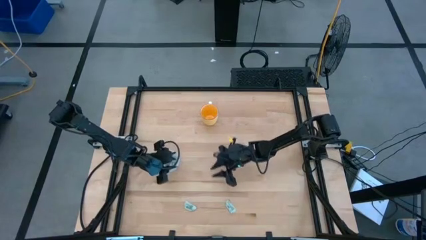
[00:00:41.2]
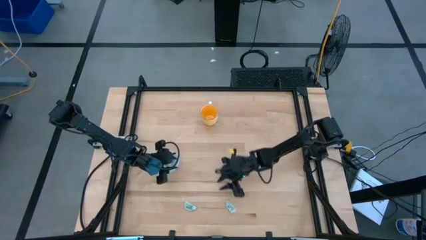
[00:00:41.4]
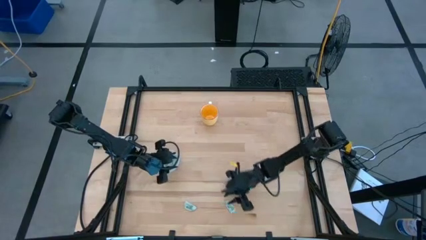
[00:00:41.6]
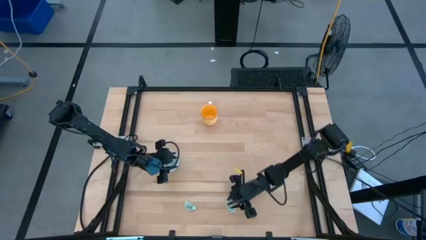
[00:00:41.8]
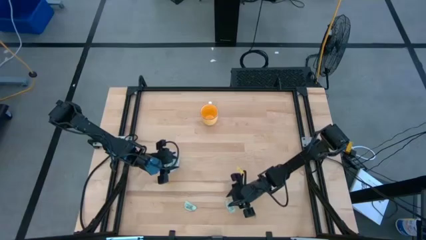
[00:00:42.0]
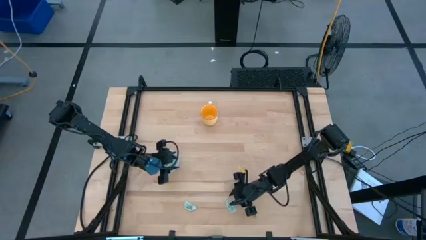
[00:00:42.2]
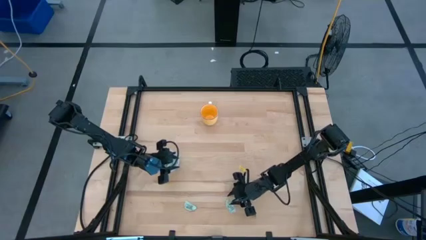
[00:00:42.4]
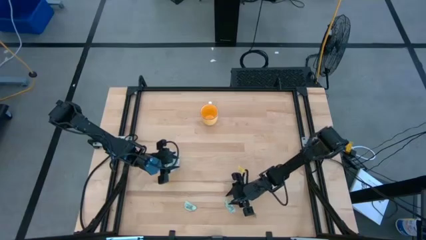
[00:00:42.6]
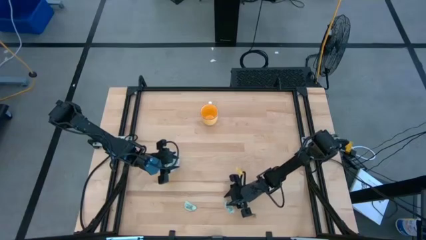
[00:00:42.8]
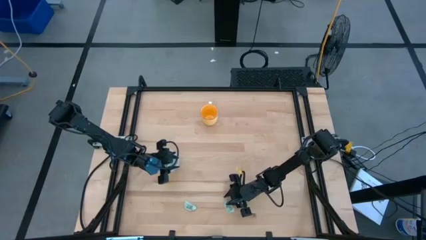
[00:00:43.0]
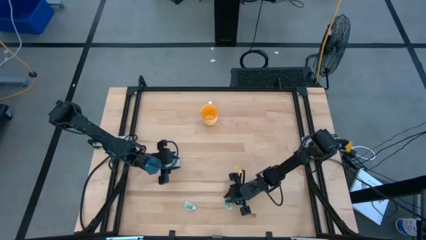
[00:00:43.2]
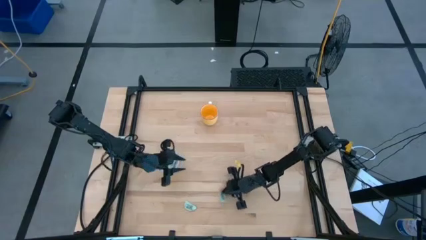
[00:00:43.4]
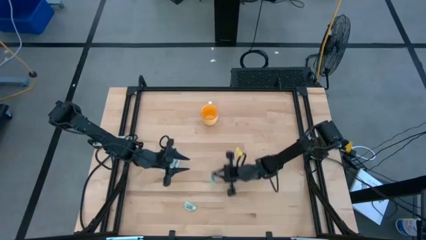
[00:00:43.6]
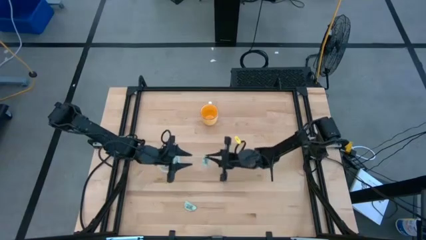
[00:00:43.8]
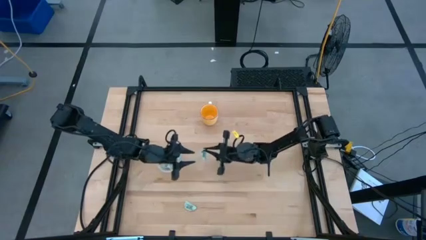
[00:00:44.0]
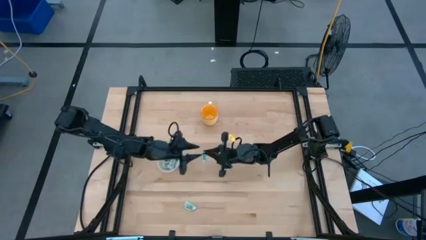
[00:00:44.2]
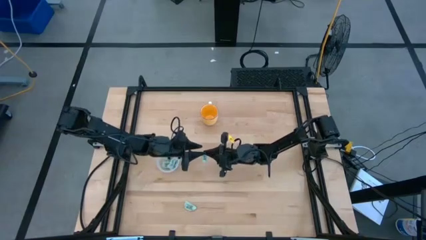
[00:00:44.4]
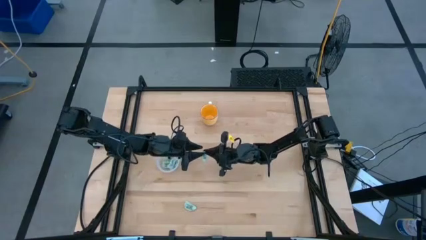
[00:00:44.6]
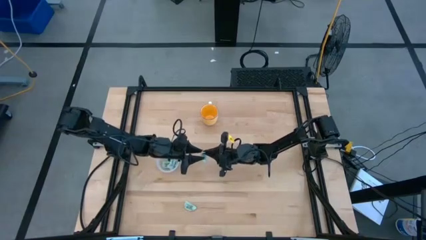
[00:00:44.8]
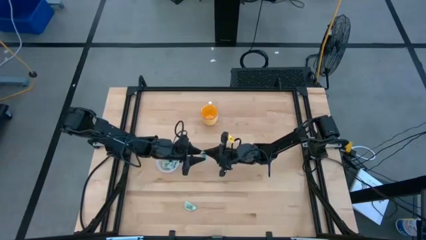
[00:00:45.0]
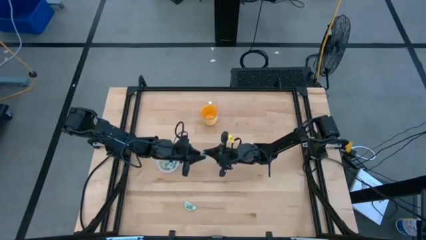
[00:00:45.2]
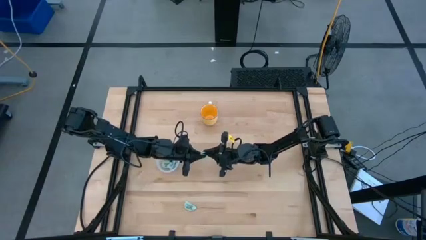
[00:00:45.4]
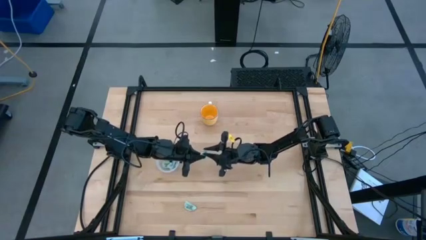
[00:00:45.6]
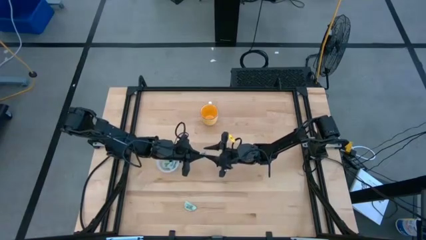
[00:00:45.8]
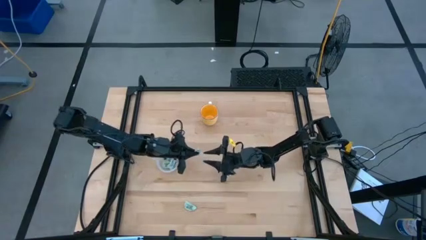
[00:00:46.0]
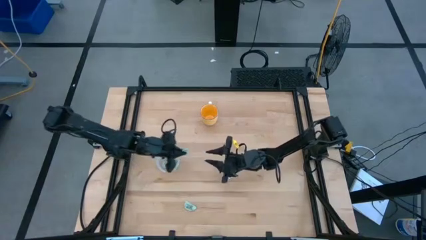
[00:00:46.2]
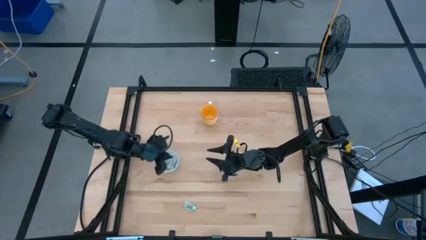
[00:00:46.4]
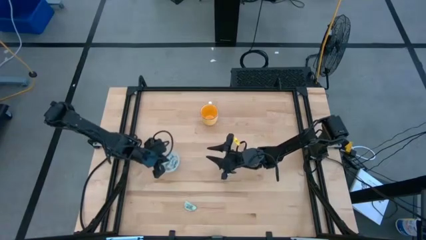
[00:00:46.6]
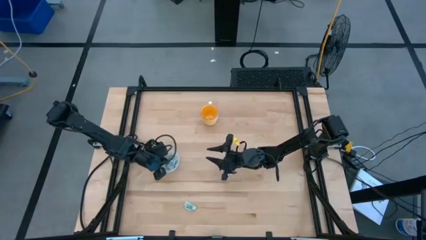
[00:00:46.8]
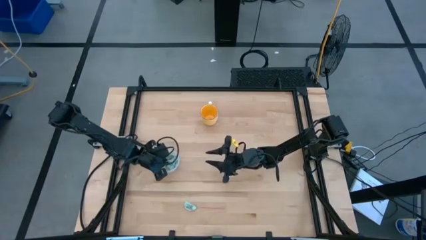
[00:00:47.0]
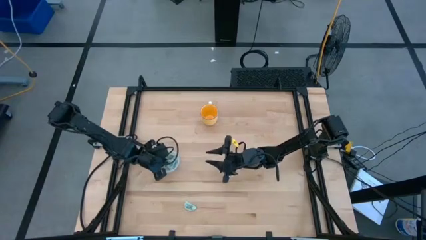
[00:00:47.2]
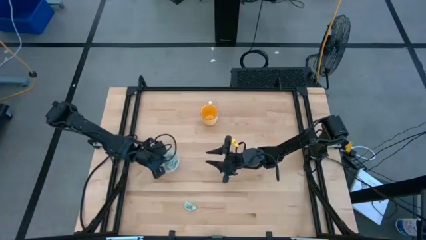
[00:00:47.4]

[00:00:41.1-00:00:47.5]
Task: Pick and place Stevia / Truvia into bins
Put the middle stevia packet into the container

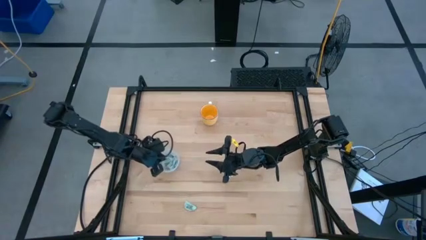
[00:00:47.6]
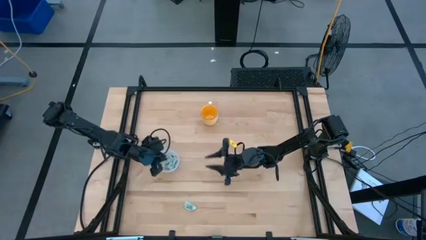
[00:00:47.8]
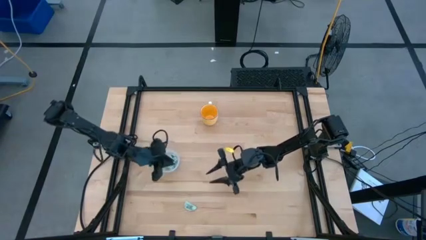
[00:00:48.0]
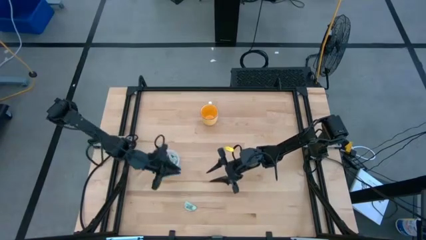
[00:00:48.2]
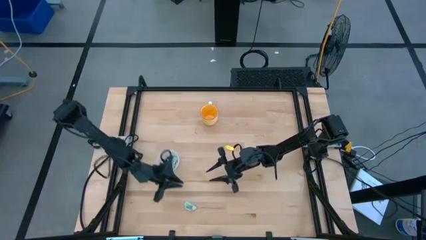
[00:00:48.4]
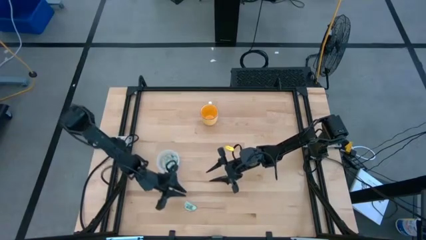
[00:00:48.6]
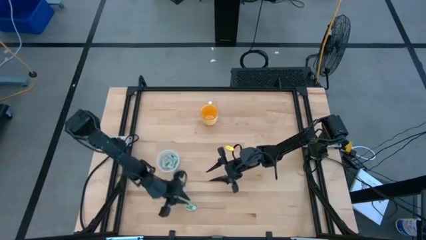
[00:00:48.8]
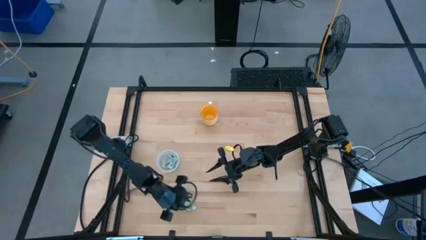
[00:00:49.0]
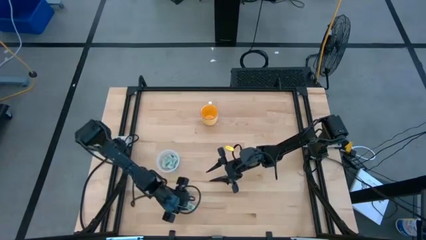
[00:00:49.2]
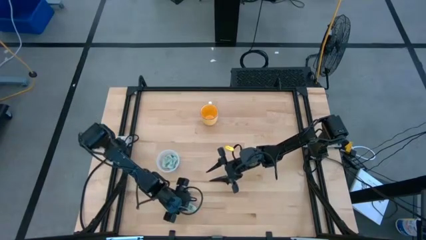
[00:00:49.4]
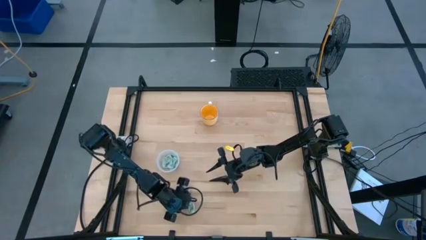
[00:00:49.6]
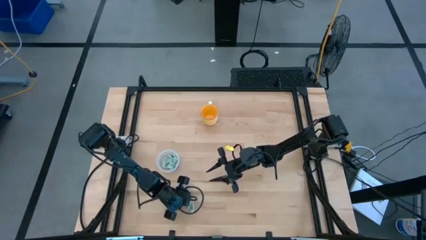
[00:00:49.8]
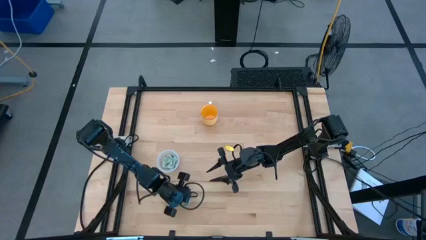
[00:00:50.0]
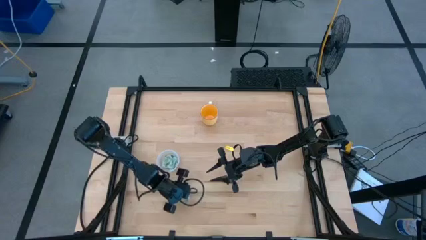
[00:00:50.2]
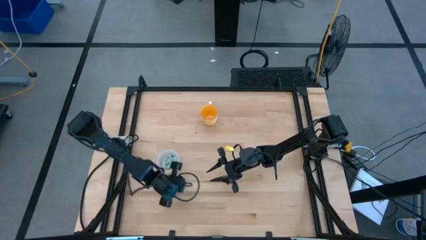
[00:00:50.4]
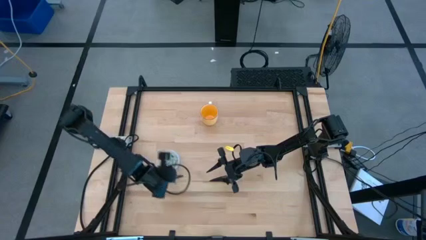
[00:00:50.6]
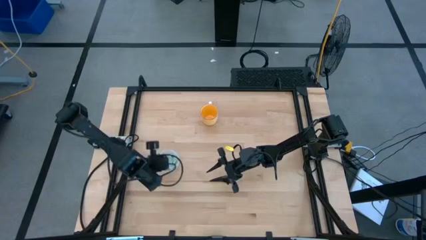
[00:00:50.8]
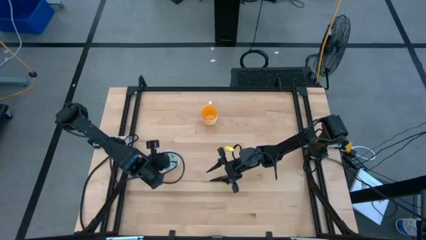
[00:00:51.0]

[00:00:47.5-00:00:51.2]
Put the stevia packet into the container

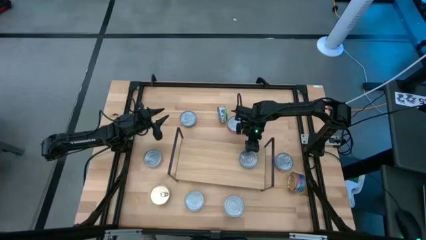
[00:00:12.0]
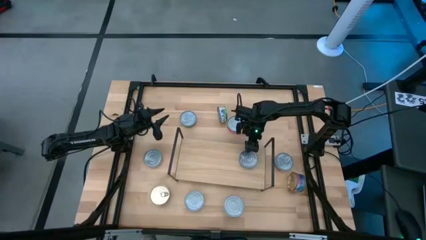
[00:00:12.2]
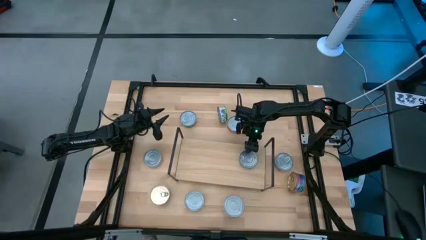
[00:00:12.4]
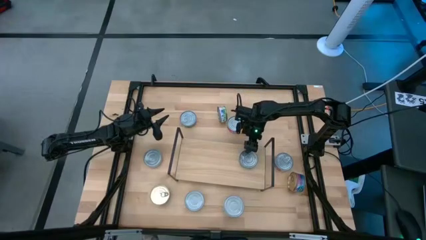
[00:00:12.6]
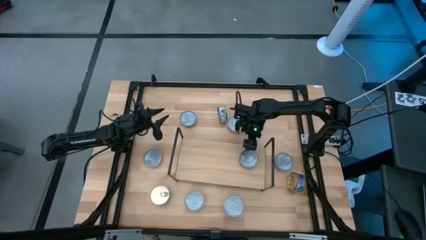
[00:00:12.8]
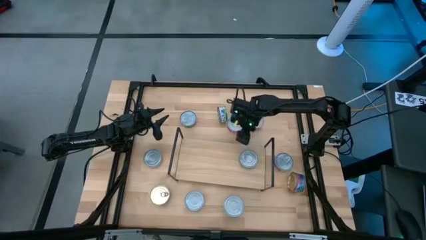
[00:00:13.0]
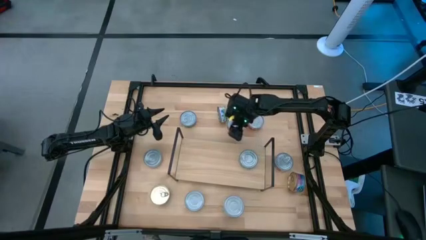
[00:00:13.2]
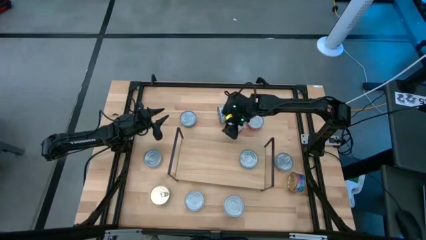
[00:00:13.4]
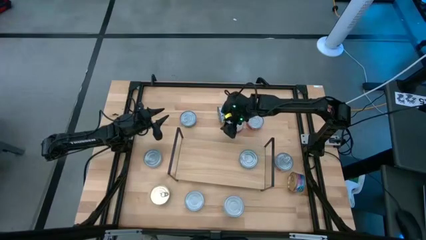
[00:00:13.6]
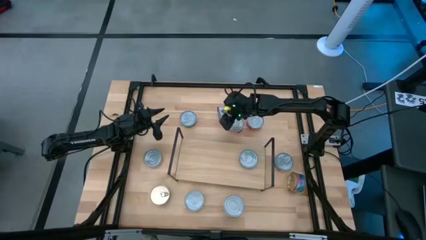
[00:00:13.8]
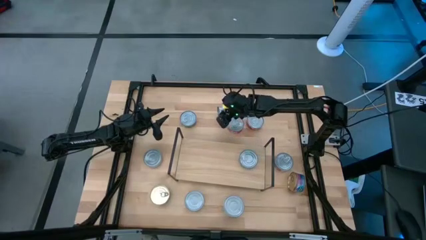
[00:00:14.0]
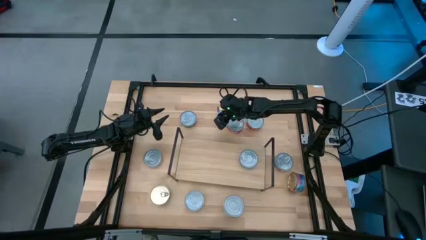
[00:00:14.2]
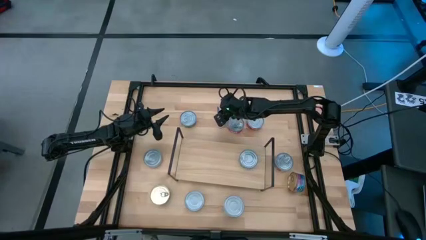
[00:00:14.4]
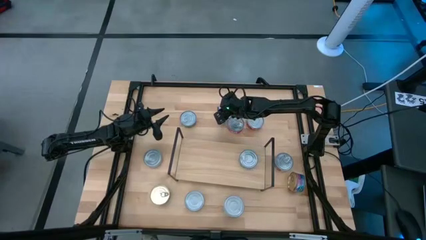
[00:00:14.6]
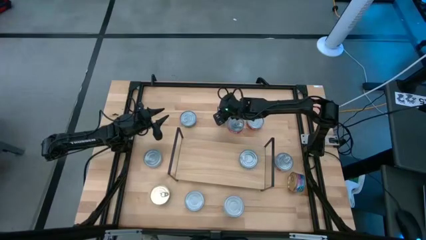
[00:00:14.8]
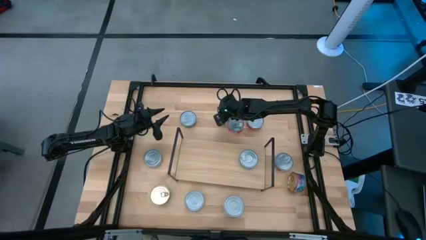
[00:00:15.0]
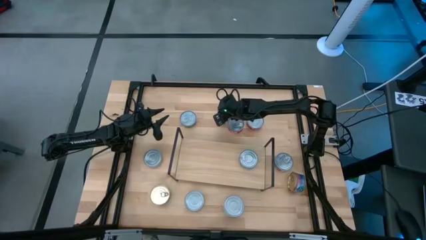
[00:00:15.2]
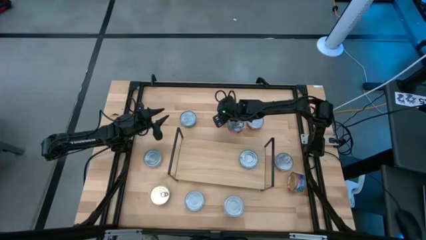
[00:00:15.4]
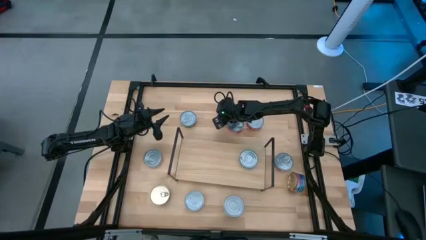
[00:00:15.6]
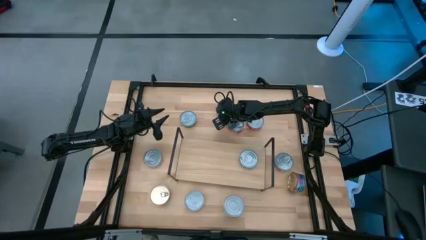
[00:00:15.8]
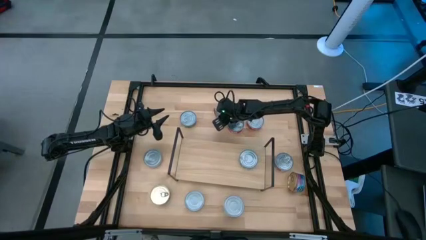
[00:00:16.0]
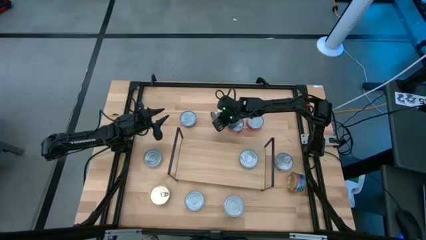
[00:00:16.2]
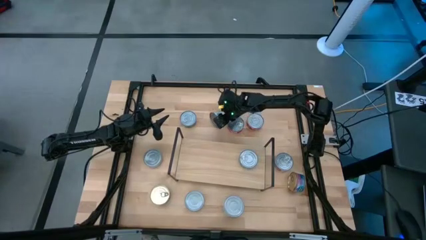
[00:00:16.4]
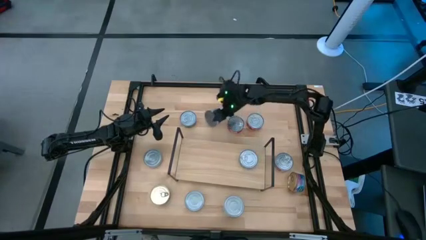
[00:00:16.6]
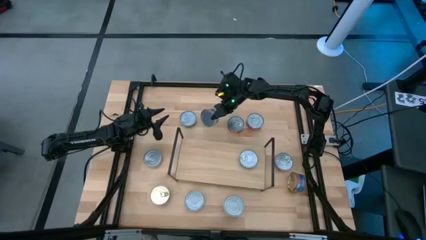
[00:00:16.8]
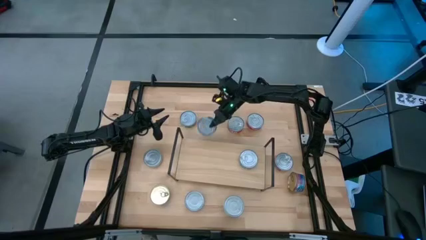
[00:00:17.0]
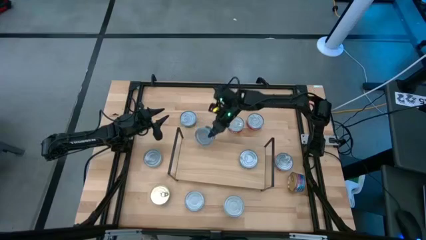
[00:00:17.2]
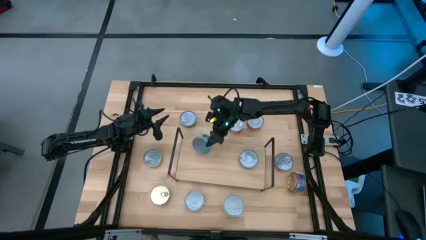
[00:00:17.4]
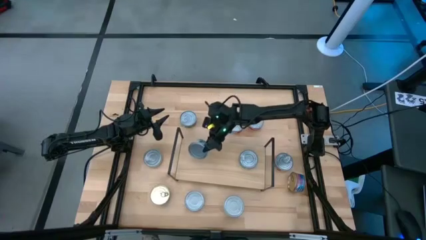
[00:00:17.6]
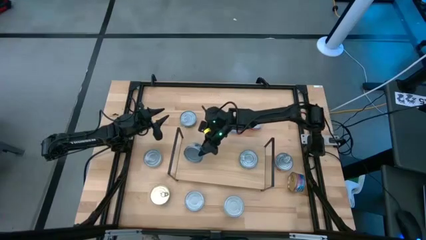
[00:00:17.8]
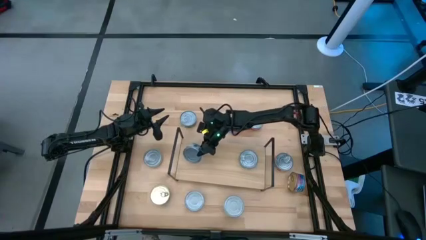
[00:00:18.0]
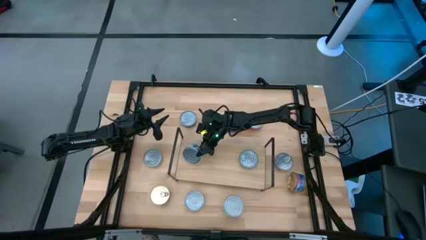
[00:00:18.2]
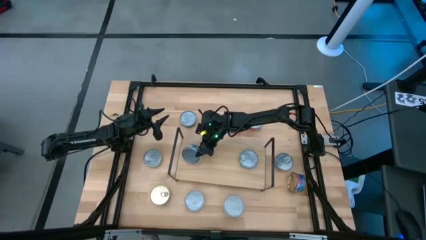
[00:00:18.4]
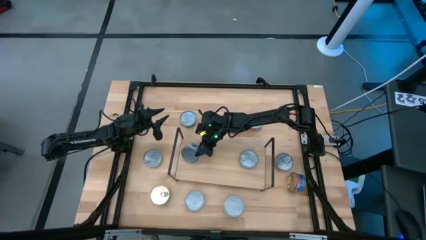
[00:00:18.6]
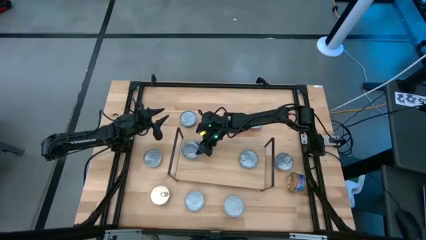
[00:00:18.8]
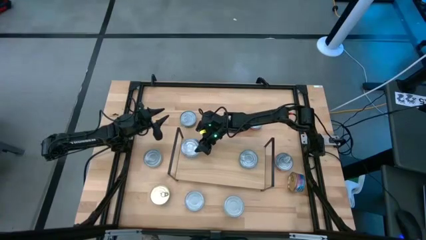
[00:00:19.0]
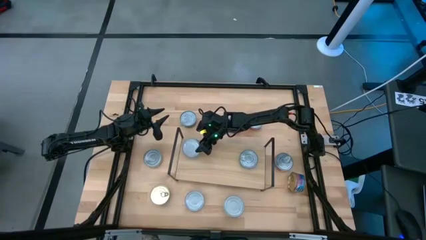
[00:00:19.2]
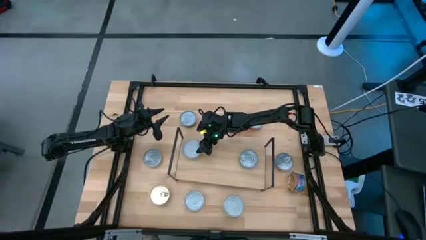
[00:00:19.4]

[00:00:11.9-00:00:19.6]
Task: Stack canned seafood by type on shelf
Put the green white tuna can on the shelf
